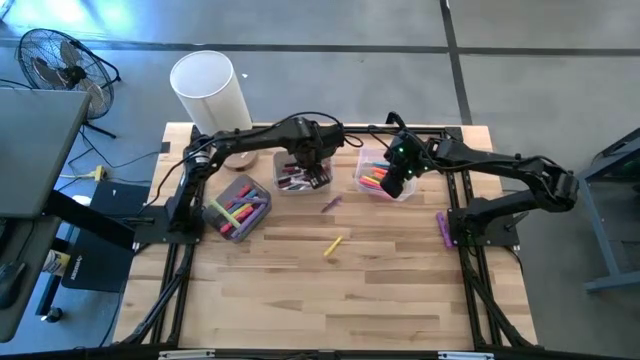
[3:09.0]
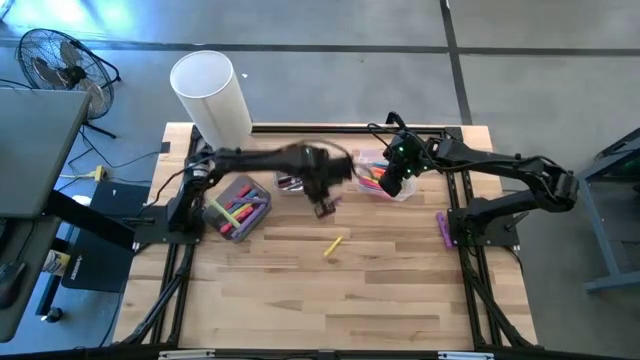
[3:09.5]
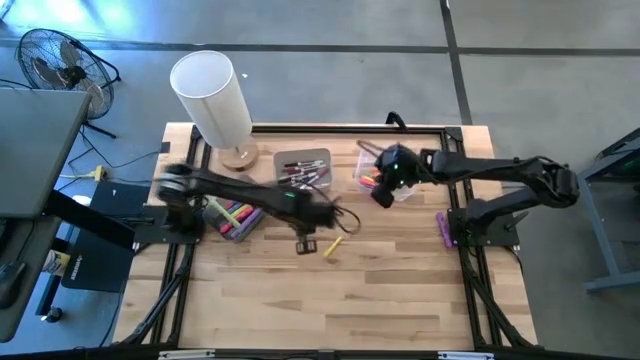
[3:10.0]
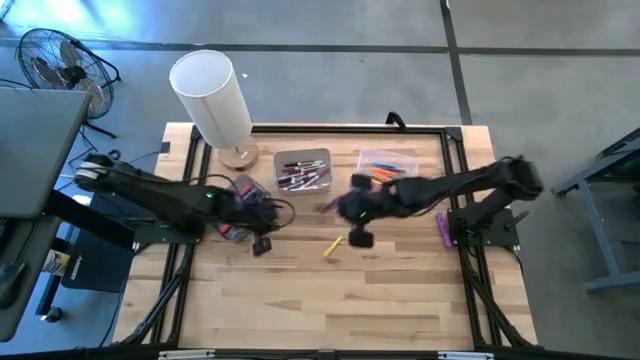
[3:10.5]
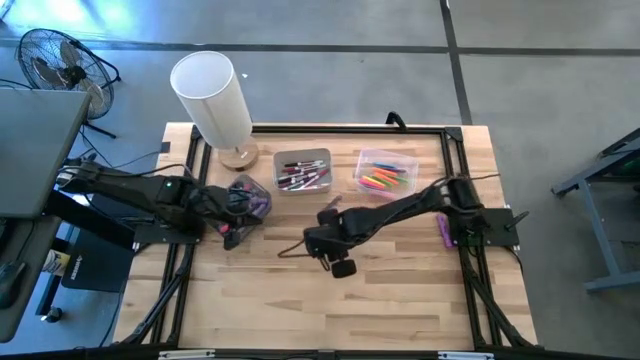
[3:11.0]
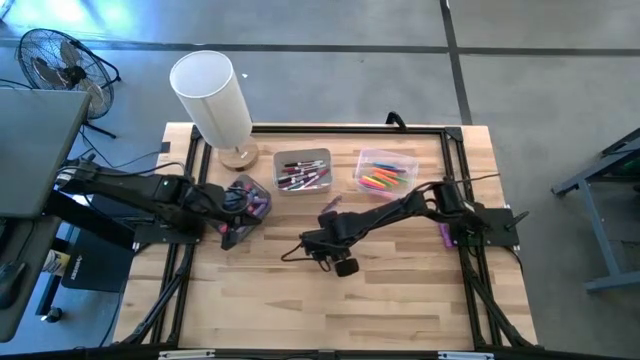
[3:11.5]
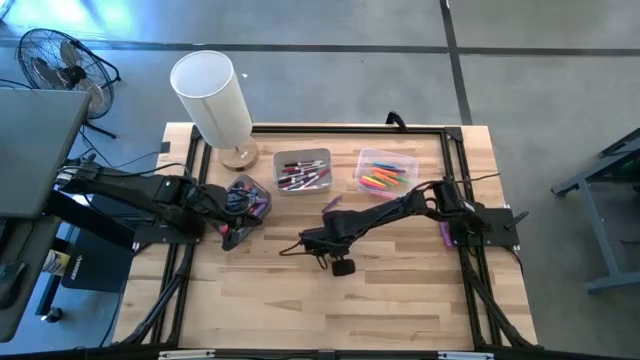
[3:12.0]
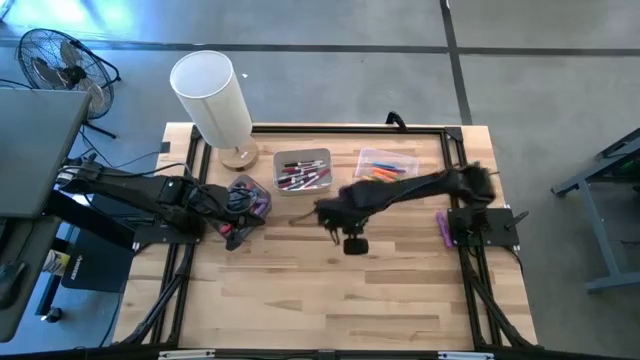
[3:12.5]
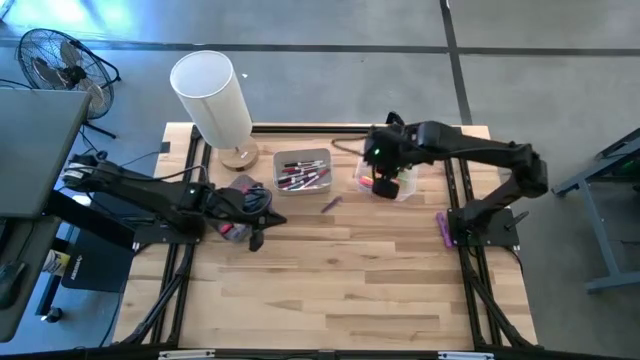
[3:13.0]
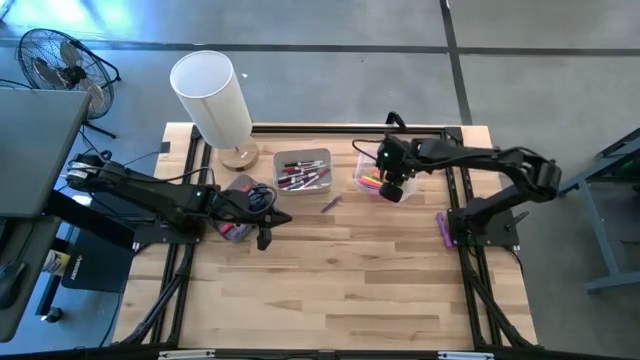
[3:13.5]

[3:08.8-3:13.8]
Task: Pick & Place Markers
Put the yellow pen into the transparent bin

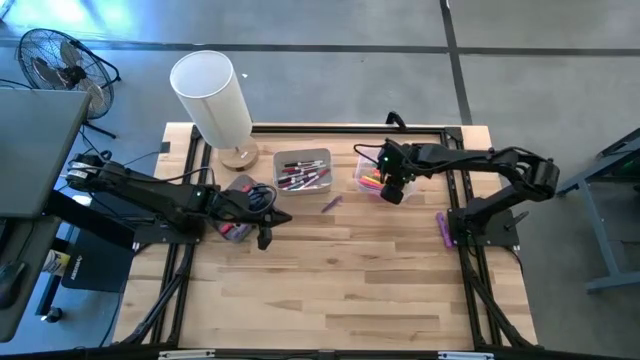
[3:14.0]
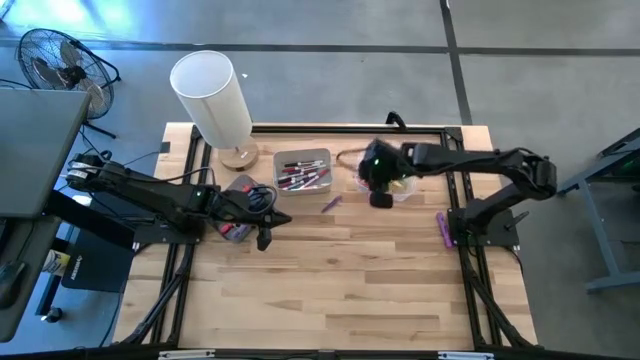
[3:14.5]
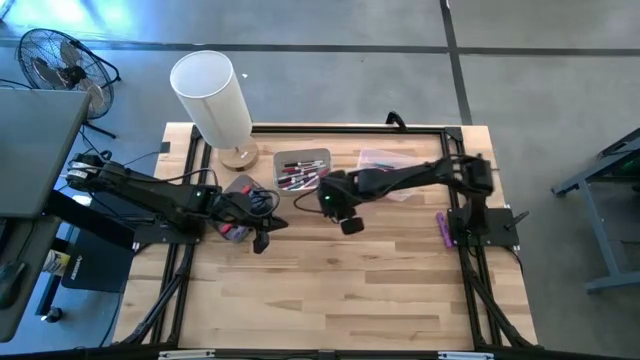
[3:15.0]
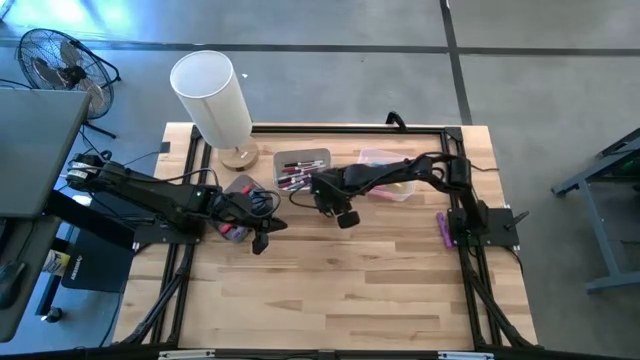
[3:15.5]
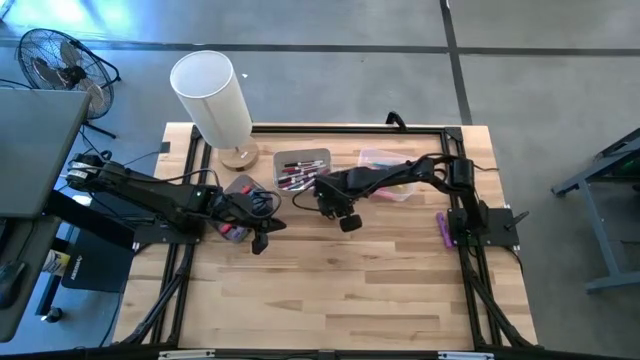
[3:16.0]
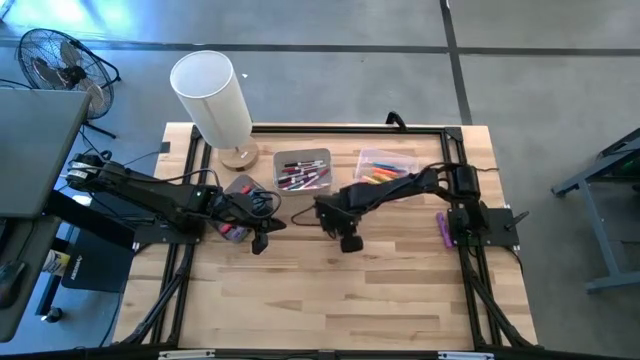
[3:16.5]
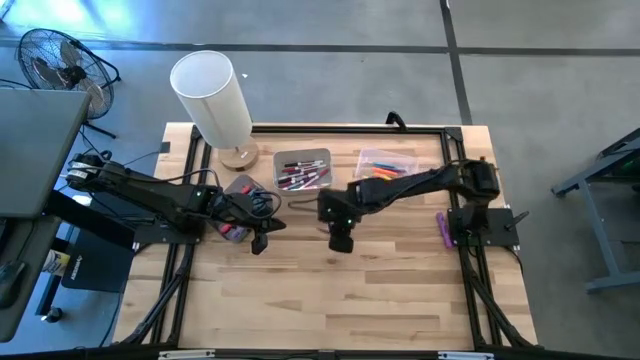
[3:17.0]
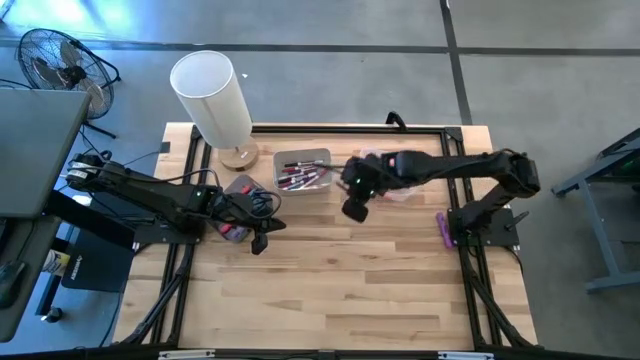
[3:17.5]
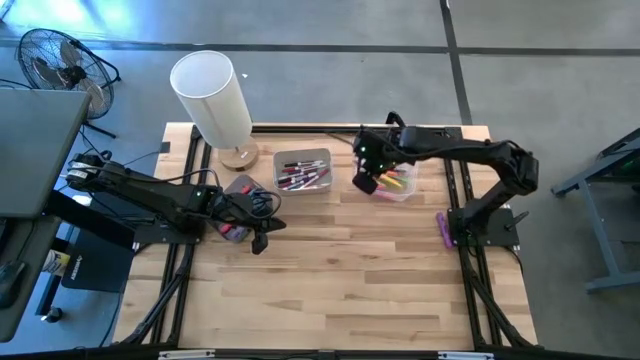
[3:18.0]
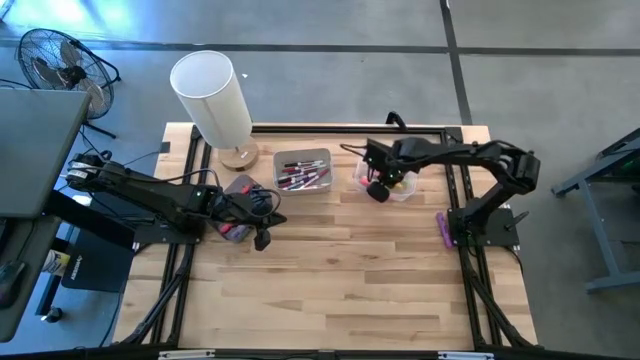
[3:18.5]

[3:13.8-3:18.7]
Put the purple pen into the transparent bin

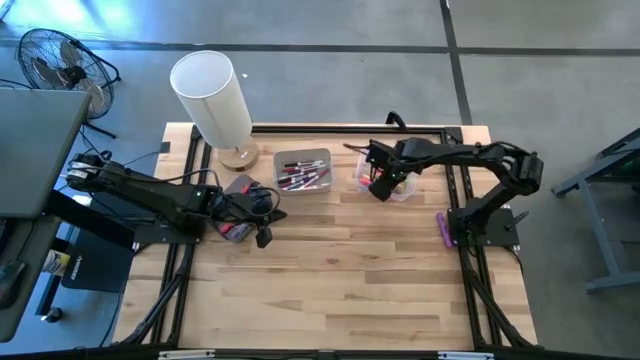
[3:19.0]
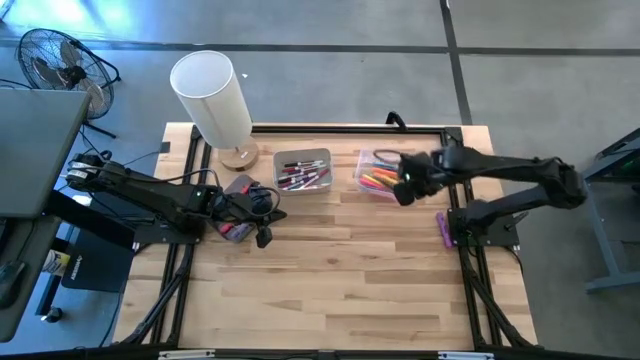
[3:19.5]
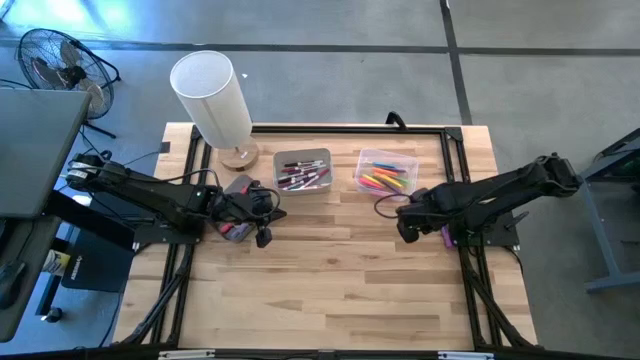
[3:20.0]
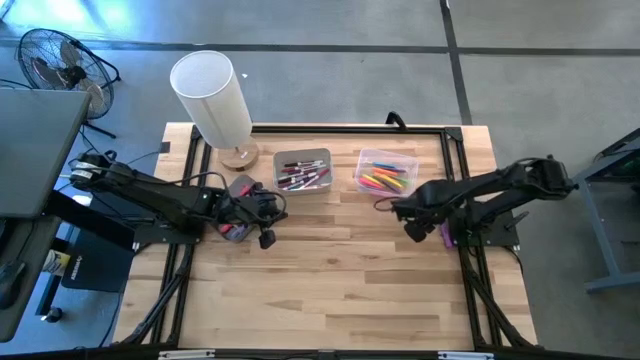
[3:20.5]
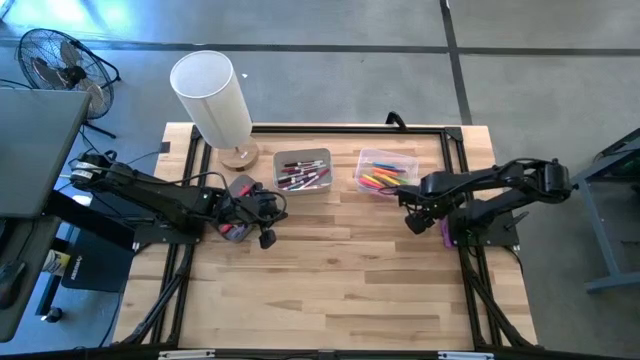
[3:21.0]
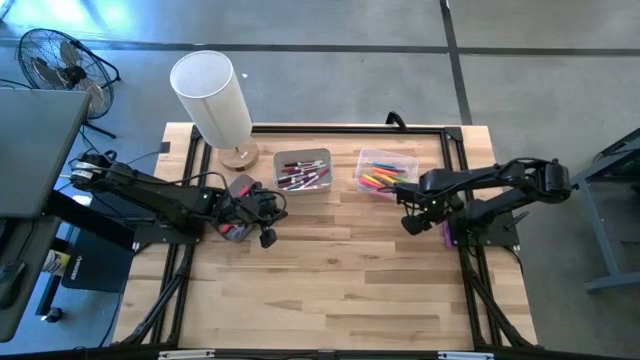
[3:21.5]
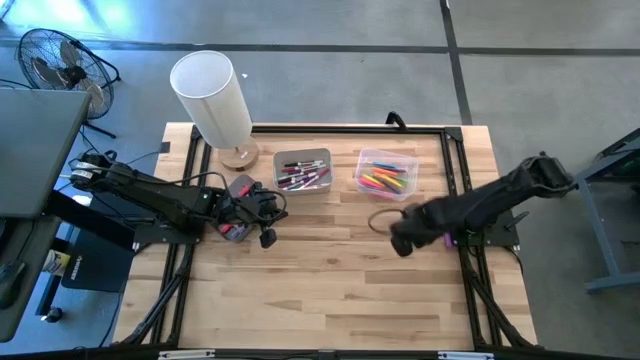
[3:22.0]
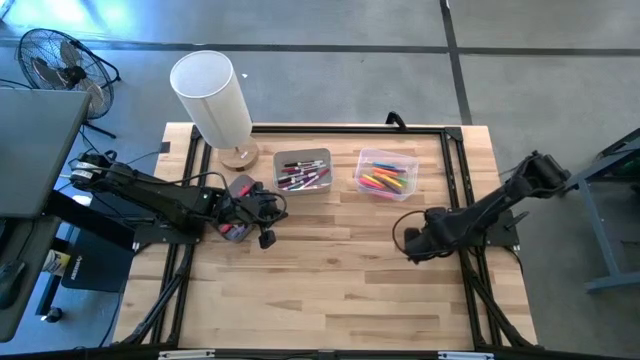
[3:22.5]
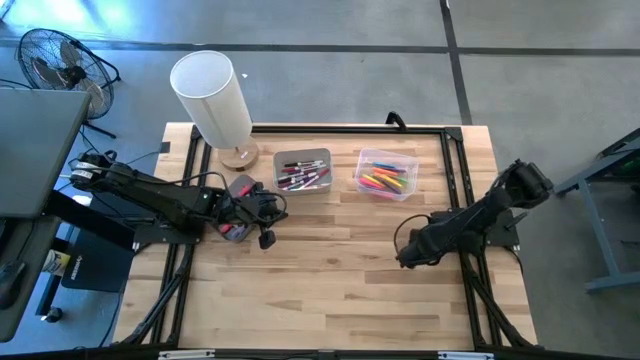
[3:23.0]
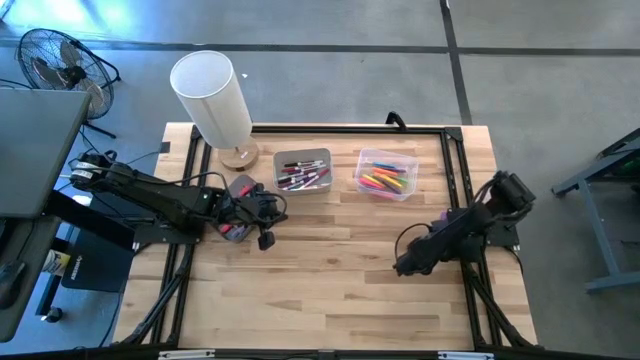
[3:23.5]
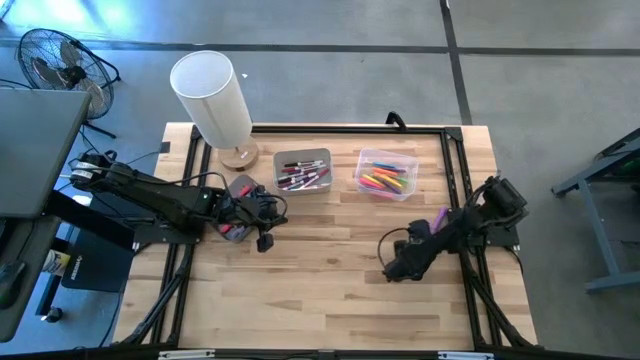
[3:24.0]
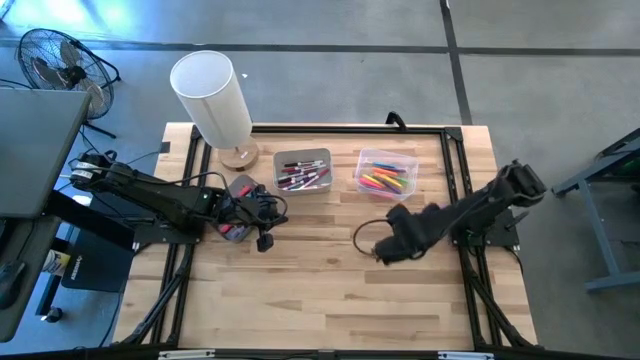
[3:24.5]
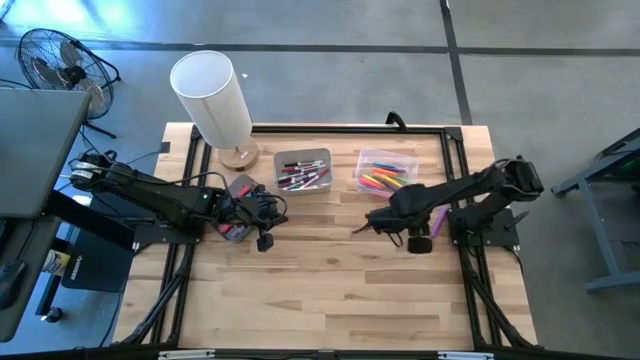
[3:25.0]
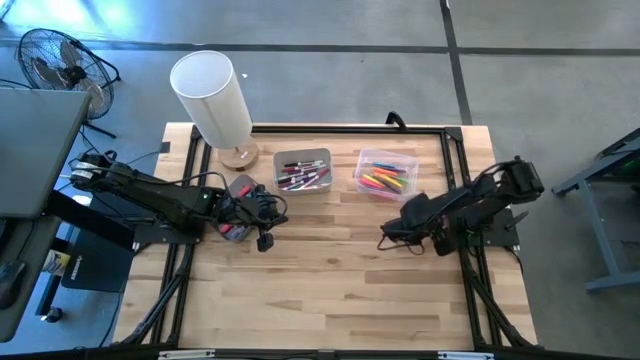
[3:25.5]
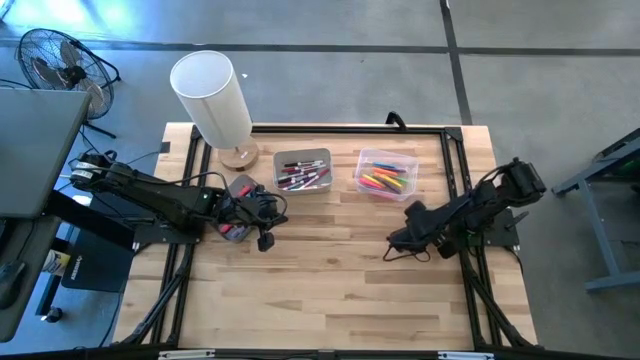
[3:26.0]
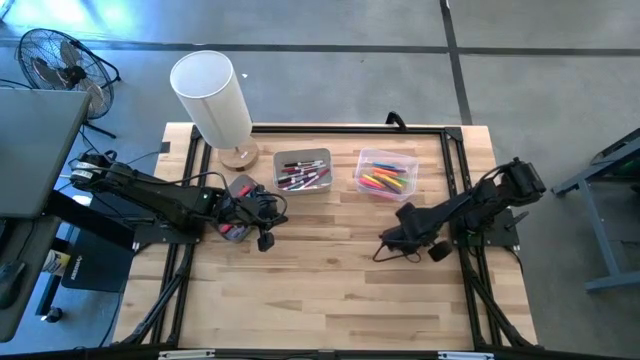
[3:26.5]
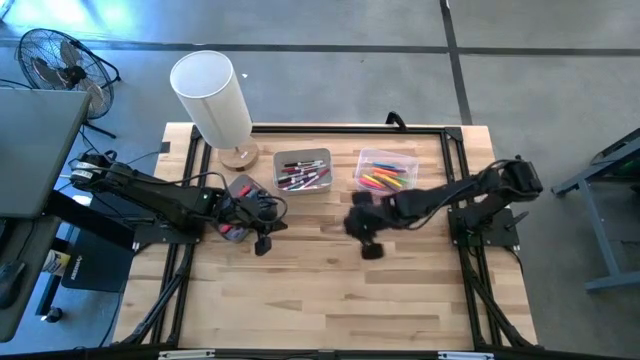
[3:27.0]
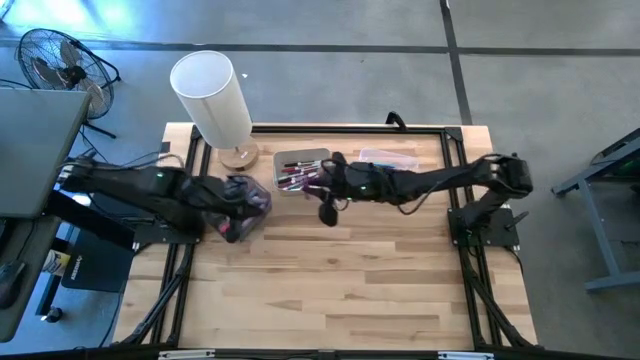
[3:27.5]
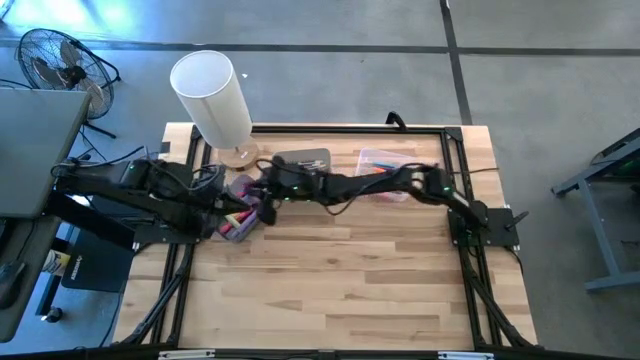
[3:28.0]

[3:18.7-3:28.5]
Put the purple highlighter pen into the black bin
